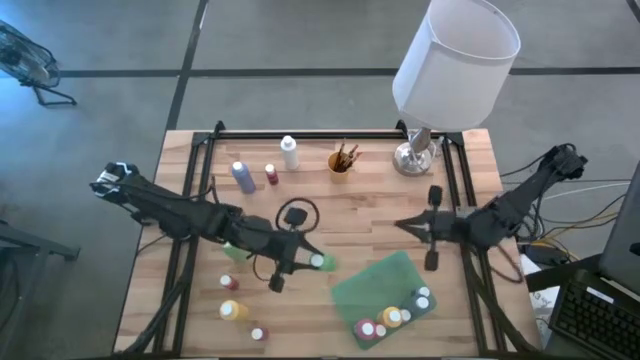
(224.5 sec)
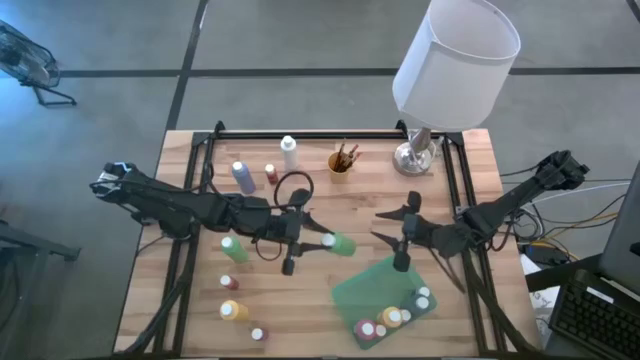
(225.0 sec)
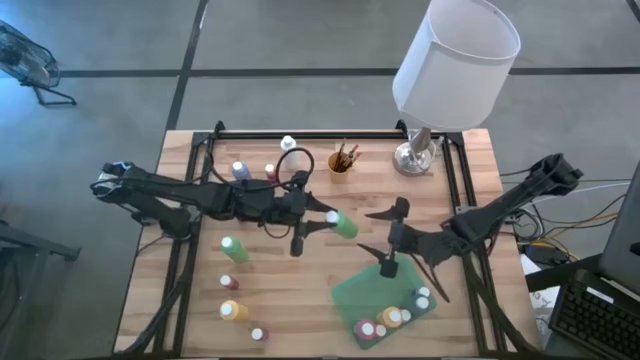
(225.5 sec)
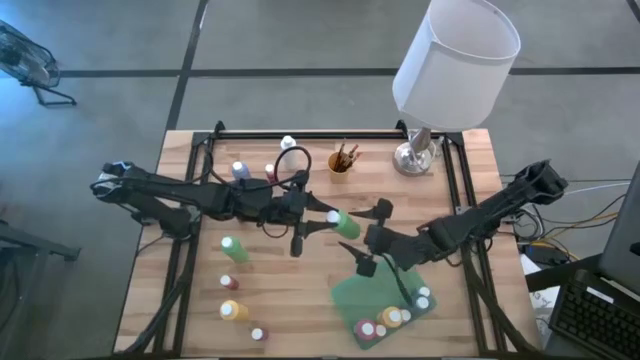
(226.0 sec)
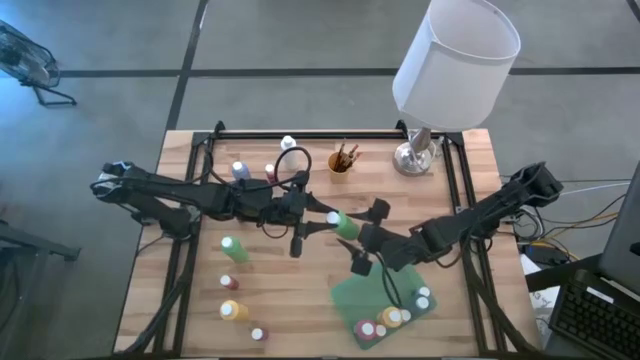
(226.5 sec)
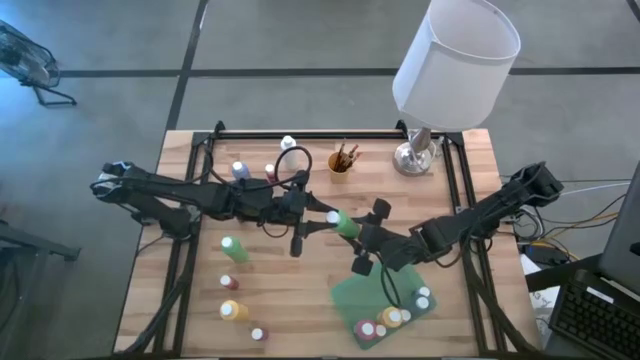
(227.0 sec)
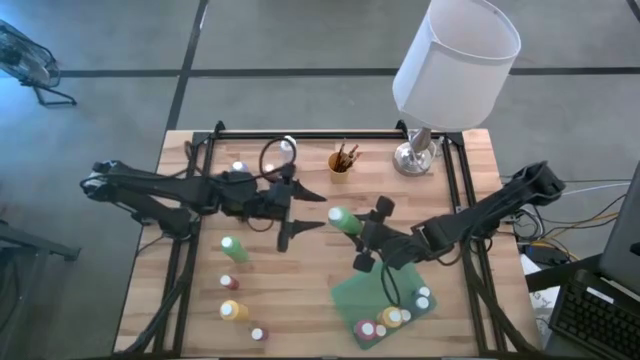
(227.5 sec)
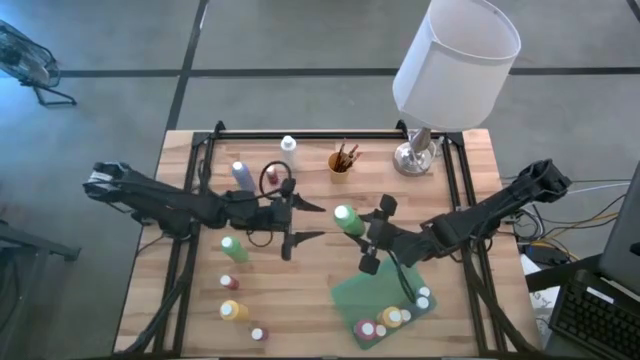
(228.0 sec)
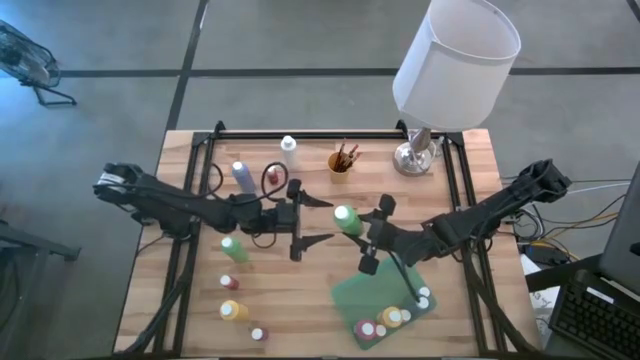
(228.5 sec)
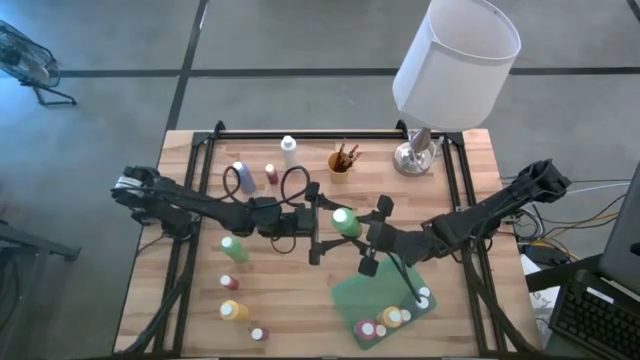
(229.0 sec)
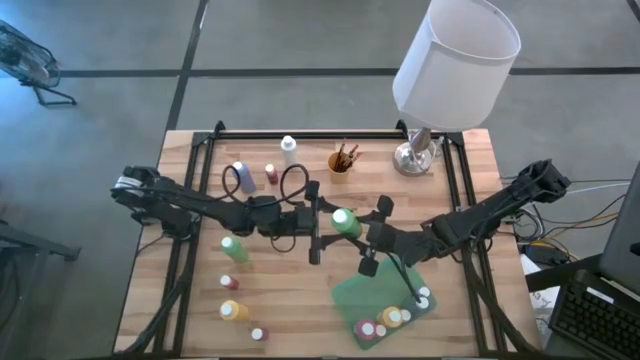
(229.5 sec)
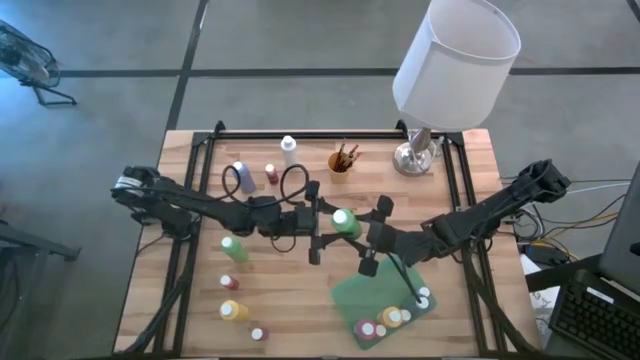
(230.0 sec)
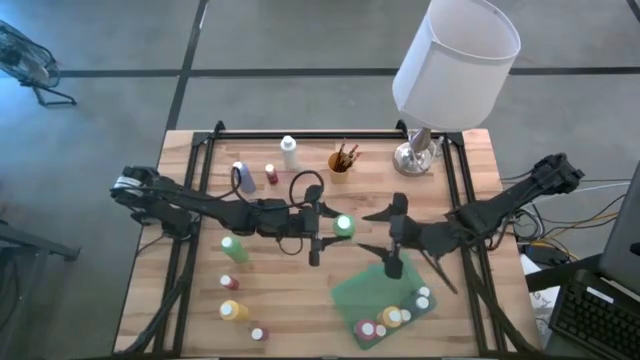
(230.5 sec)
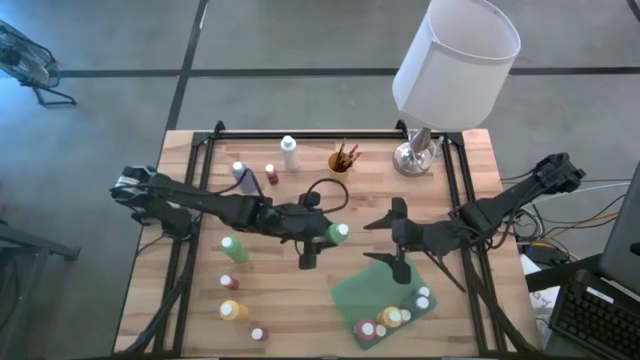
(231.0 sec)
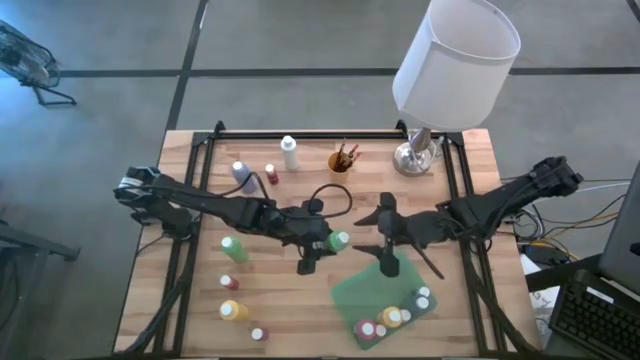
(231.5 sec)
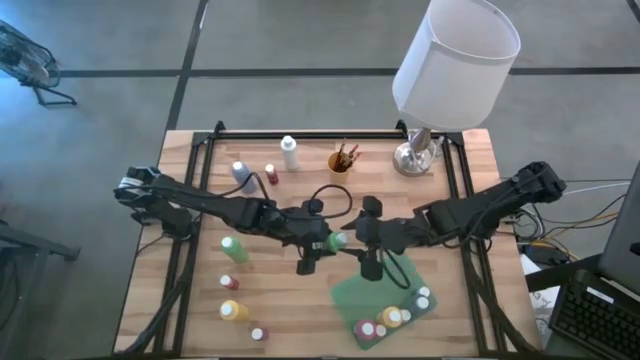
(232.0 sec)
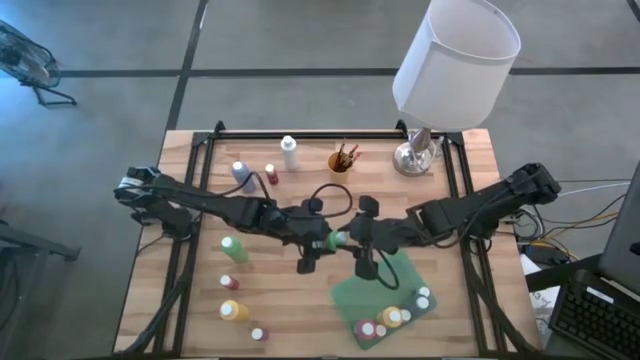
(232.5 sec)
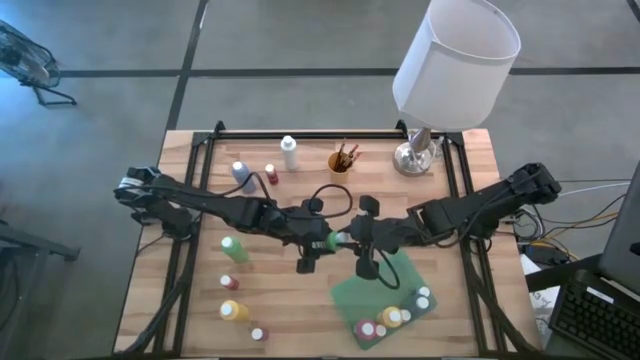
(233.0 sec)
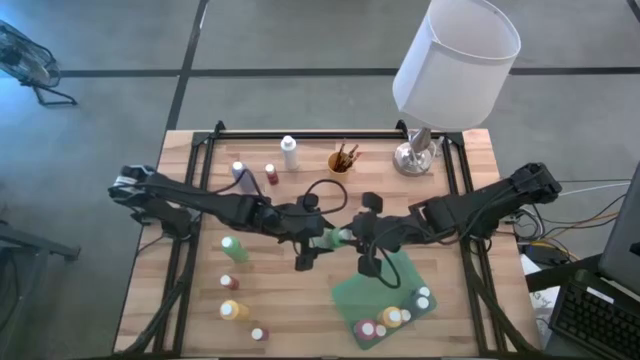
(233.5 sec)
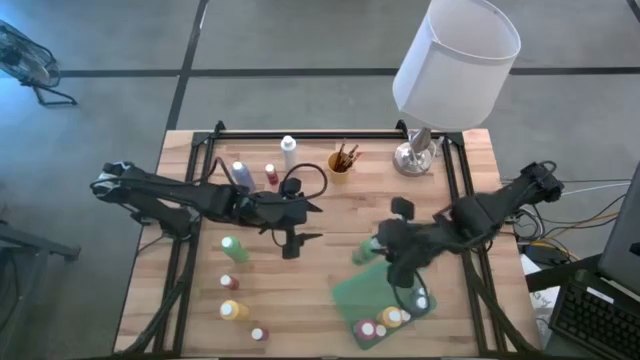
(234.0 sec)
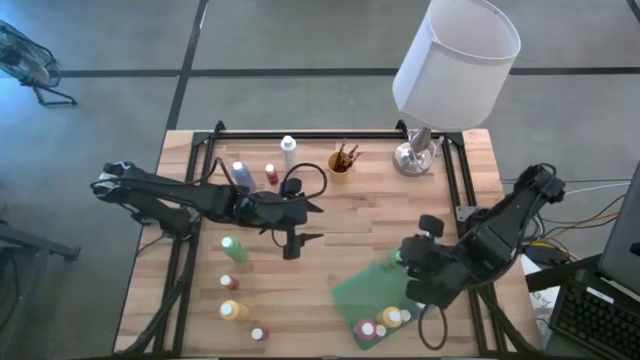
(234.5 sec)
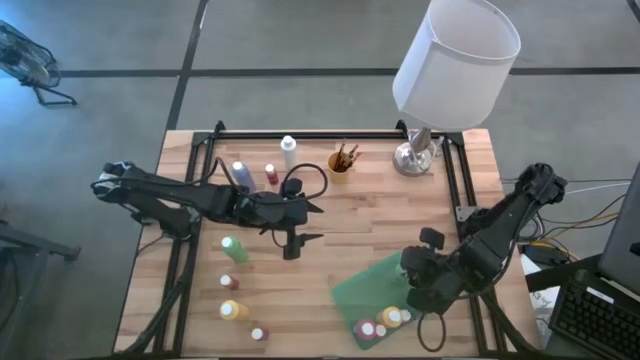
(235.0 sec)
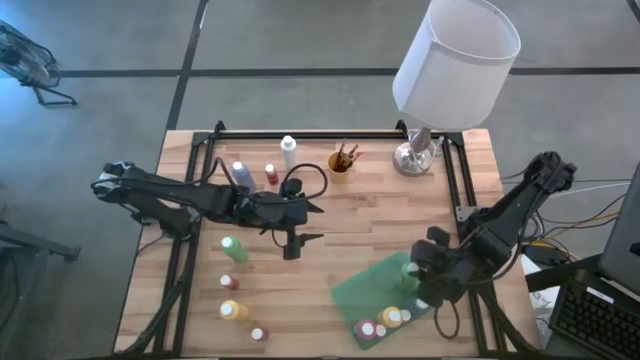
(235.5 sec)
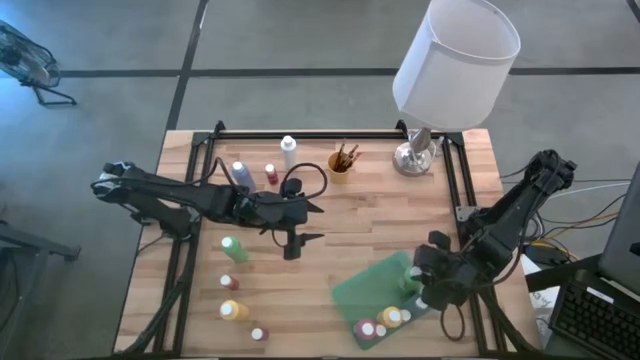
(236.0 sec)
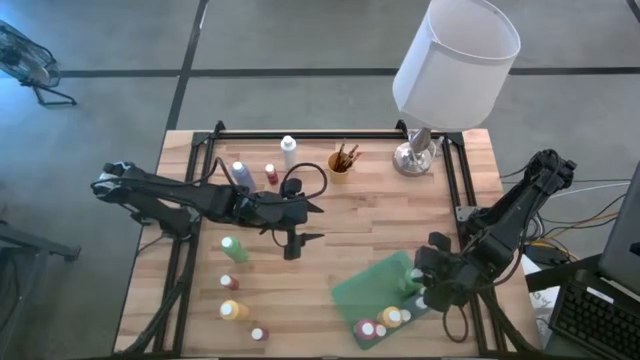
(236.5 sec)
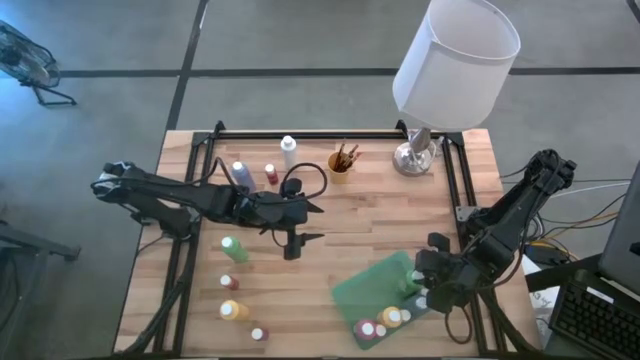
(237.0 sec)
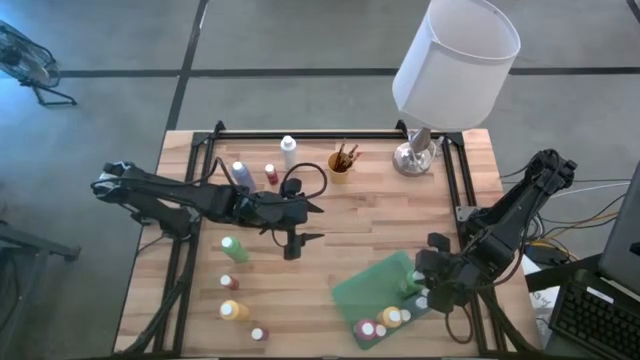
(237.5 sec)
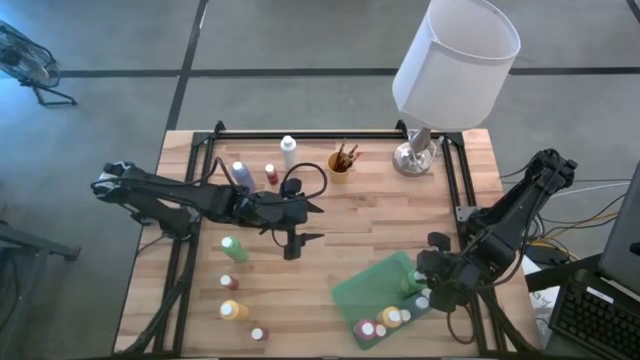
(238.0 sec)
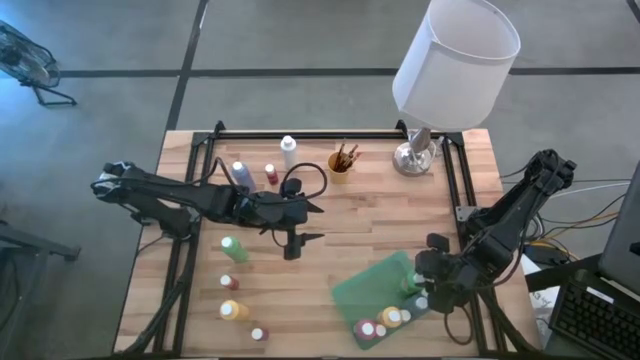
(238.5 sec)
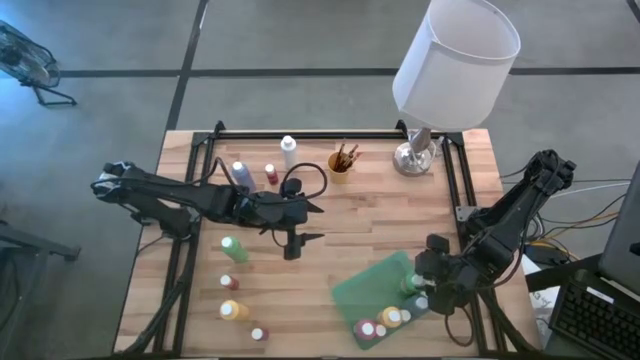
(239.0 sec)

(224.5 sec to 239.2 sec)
Task: Pick & Place Paint Supplies
Put the big green paint bottle into the green bin

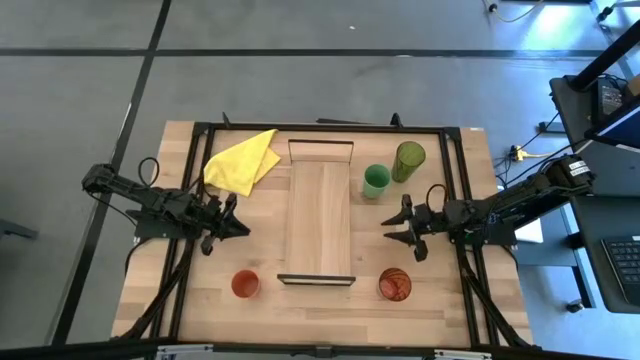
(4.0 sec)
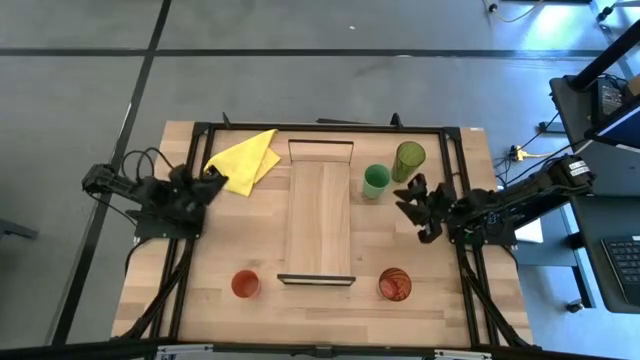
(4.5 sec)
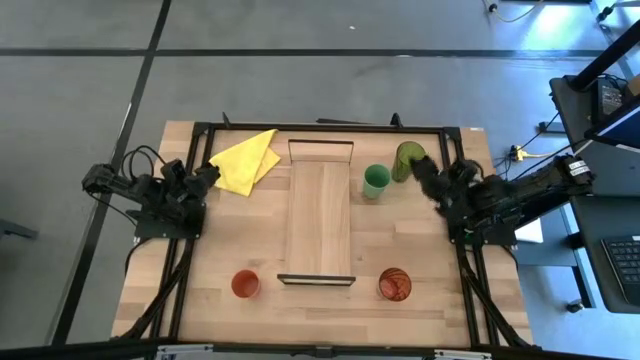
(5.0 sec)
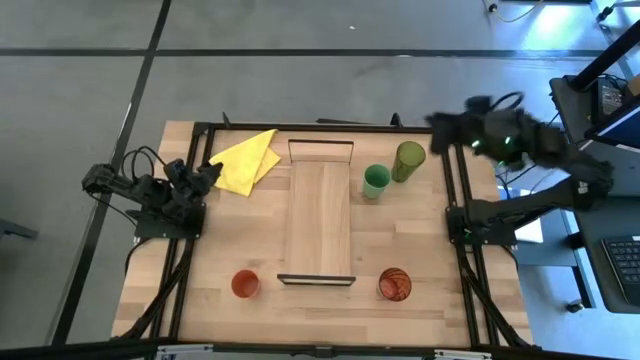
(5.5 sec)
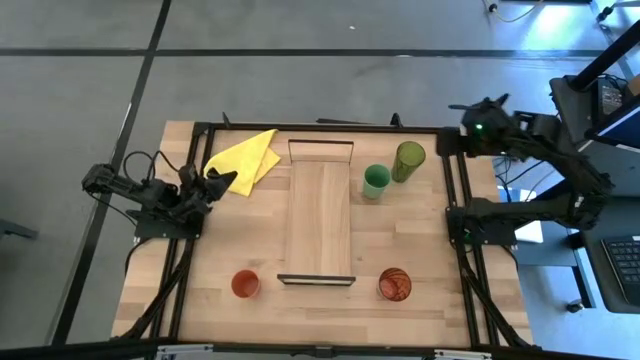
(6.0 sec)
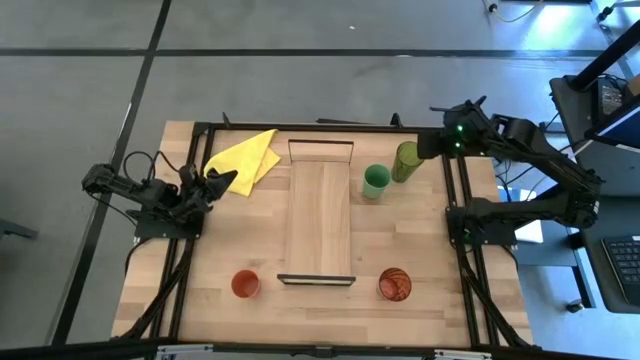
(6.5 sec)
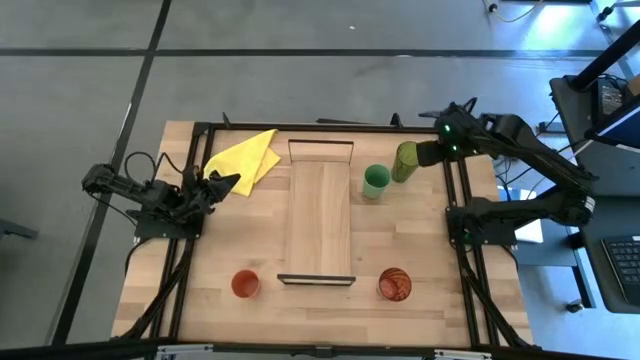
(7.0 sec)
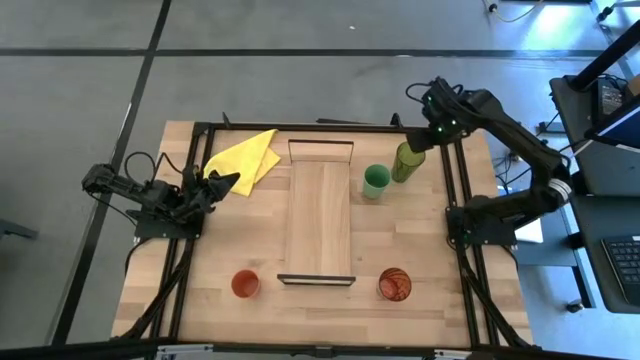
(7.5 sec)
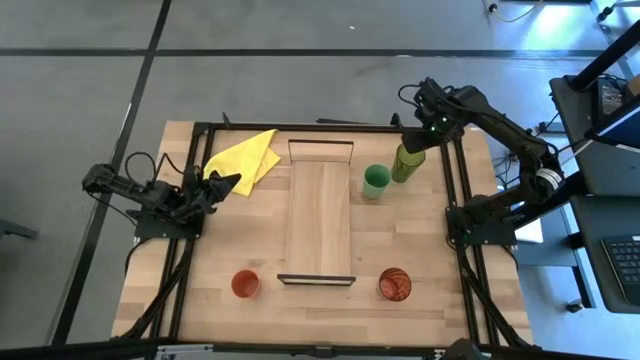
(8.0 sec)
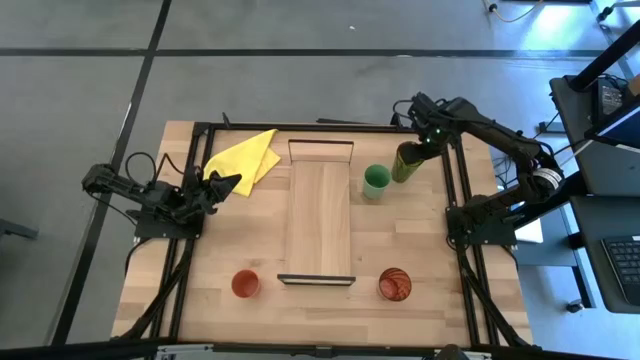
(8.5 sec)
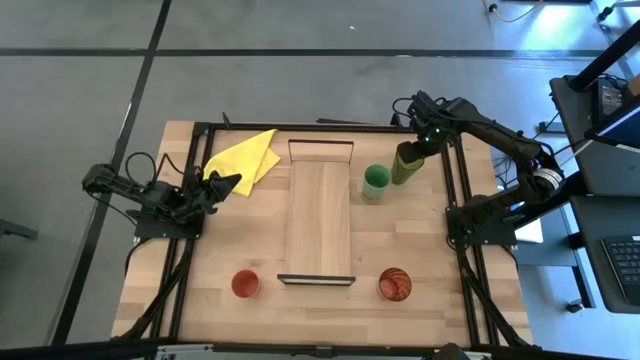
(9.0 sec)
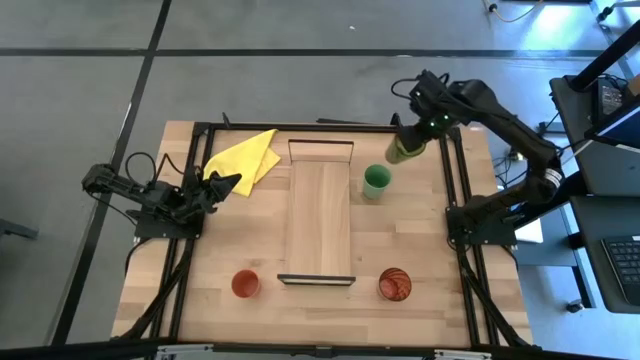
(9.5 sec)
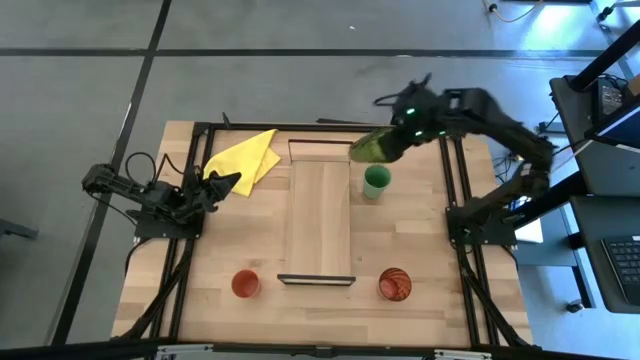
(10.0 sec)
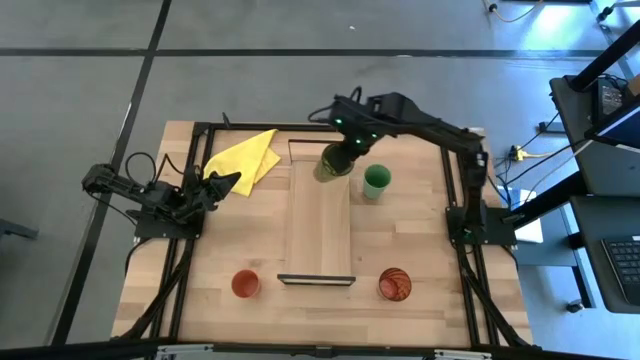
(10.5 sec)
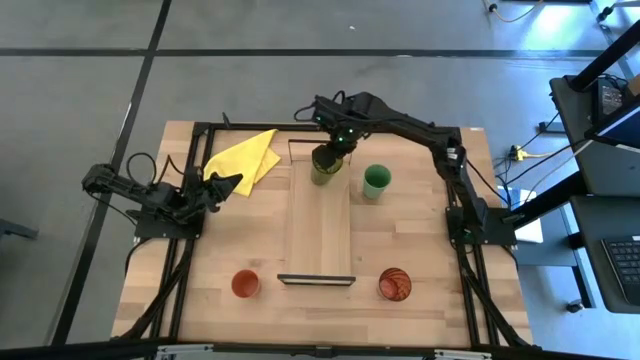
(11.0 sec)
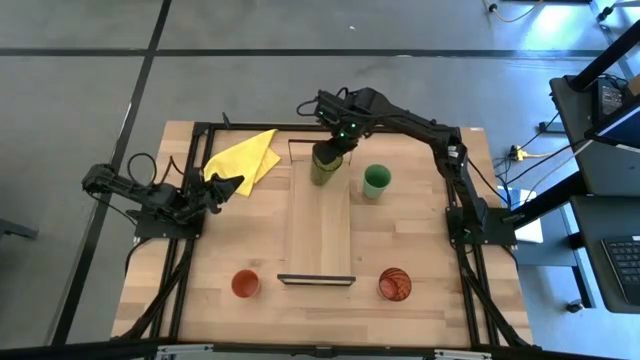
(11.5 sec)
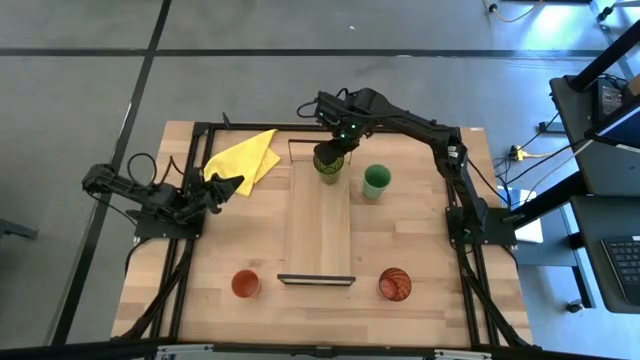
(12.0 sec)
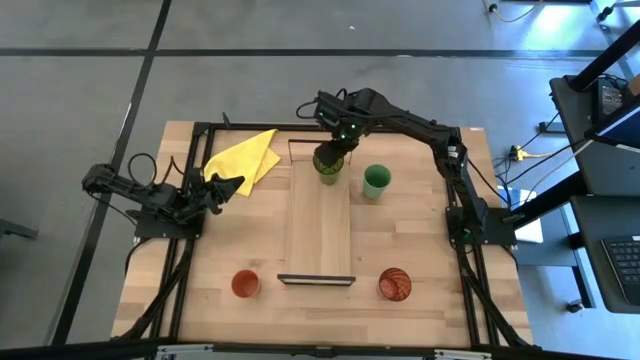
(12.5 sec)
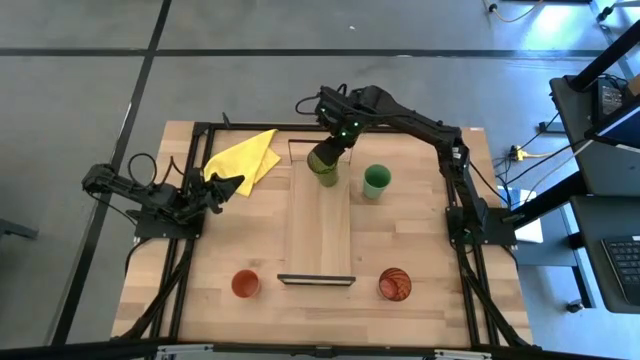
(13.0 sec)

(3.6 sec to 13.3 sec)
Task: Stack small to large cups/mugs on shelf
Put the green cup on the shelf
